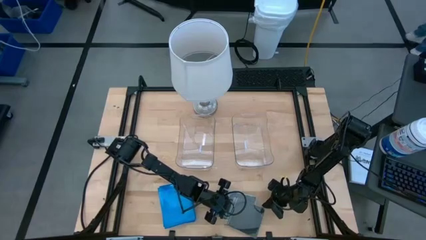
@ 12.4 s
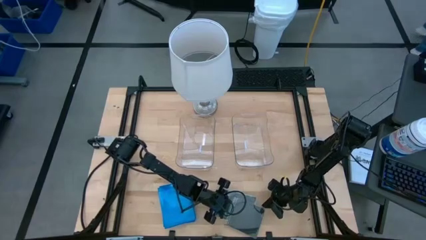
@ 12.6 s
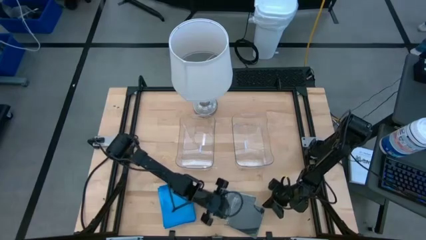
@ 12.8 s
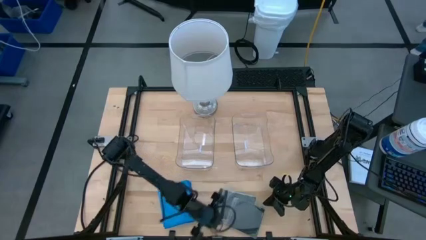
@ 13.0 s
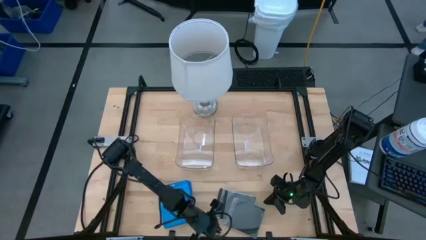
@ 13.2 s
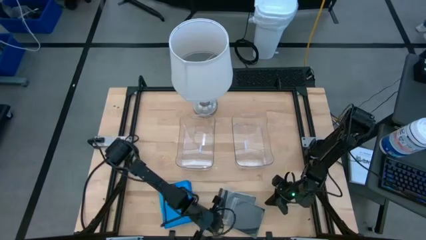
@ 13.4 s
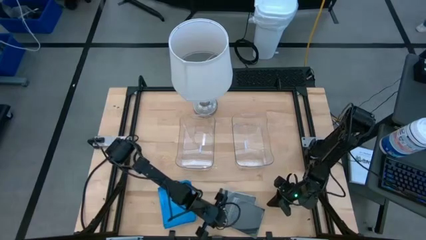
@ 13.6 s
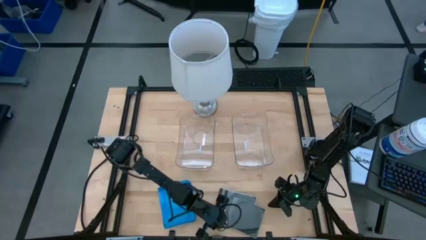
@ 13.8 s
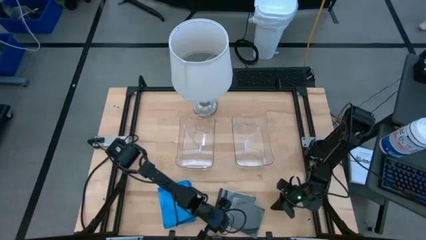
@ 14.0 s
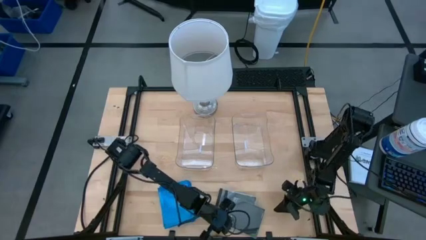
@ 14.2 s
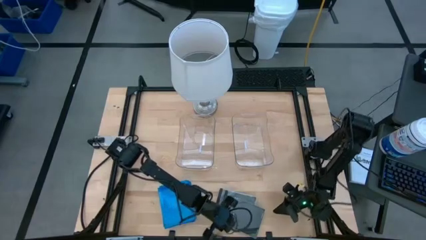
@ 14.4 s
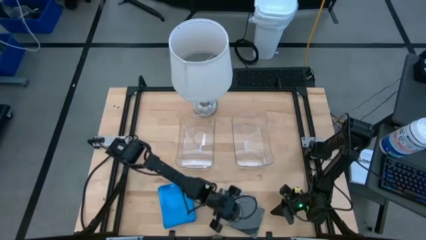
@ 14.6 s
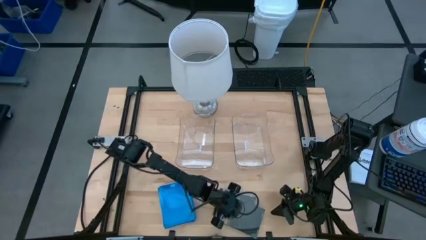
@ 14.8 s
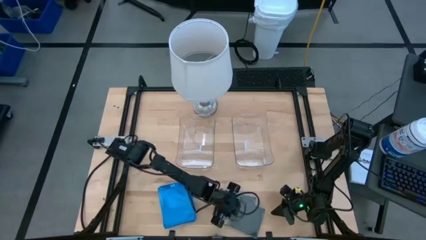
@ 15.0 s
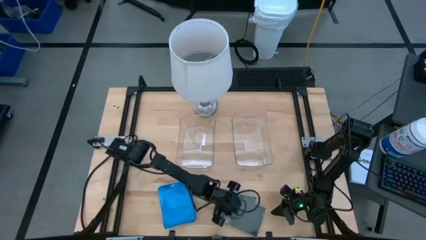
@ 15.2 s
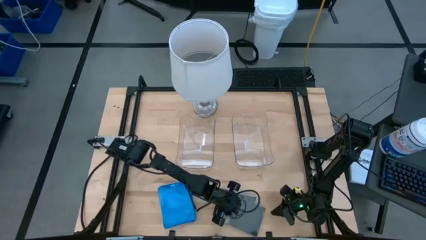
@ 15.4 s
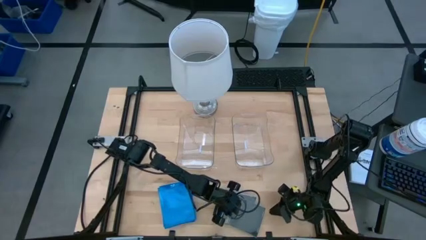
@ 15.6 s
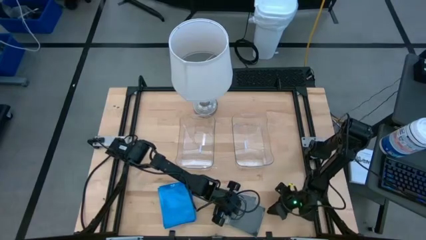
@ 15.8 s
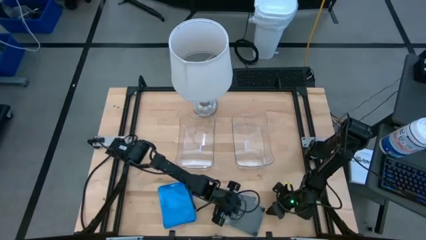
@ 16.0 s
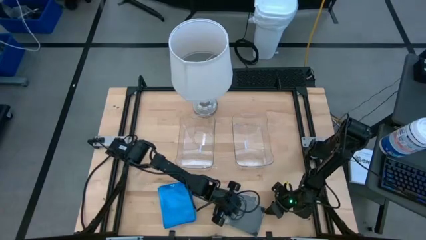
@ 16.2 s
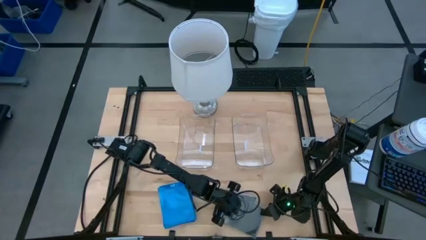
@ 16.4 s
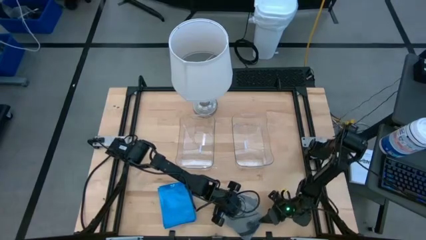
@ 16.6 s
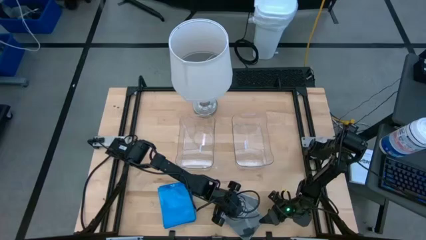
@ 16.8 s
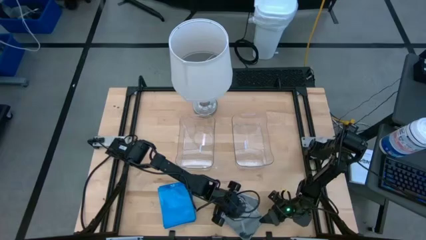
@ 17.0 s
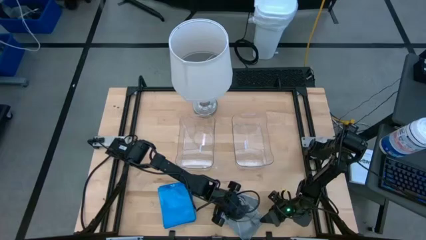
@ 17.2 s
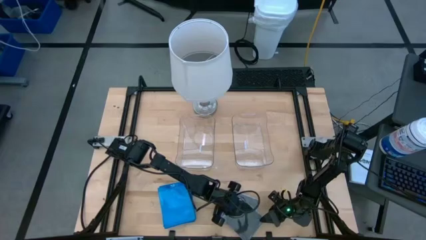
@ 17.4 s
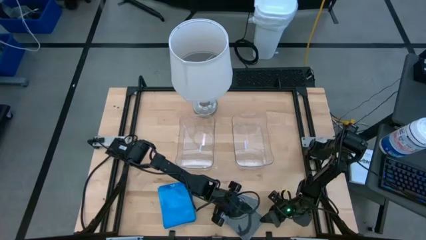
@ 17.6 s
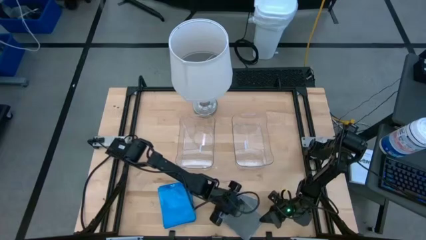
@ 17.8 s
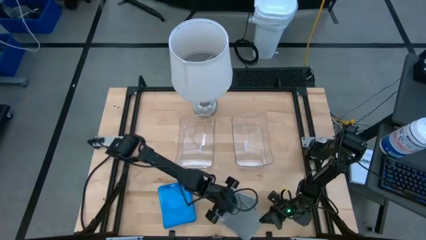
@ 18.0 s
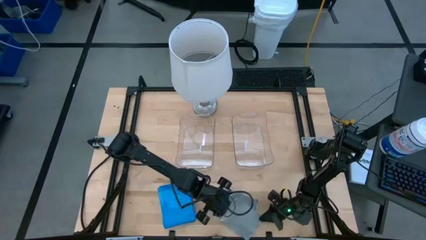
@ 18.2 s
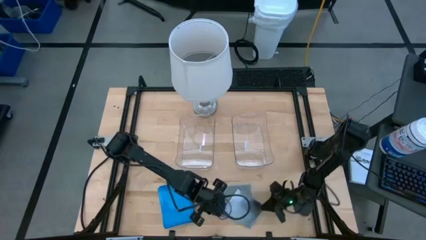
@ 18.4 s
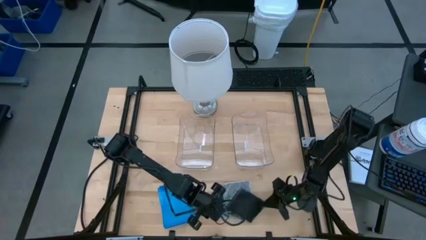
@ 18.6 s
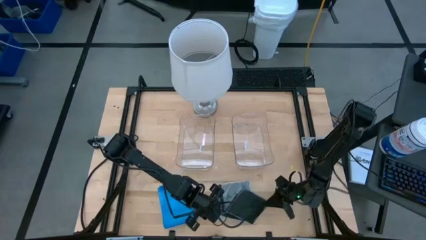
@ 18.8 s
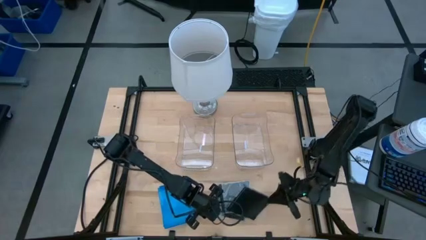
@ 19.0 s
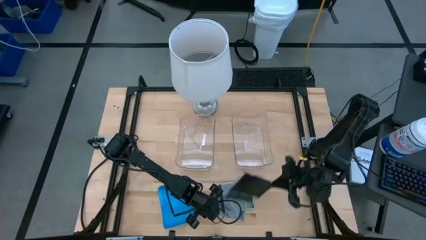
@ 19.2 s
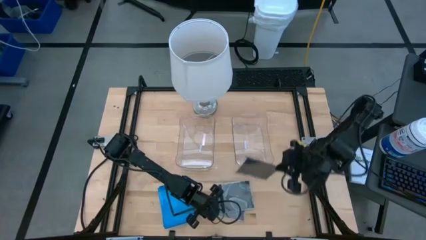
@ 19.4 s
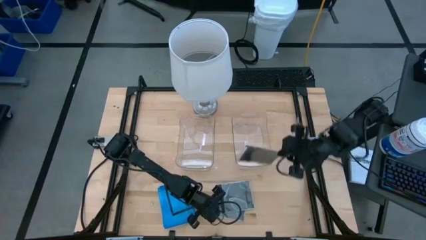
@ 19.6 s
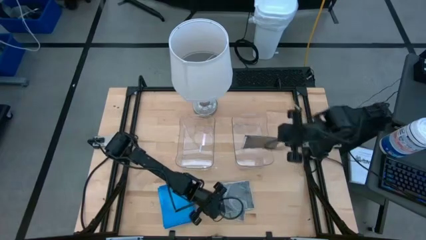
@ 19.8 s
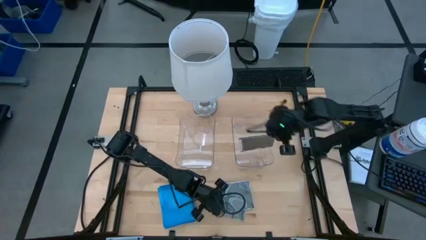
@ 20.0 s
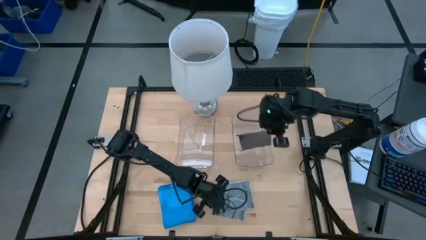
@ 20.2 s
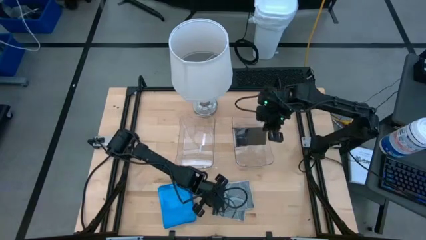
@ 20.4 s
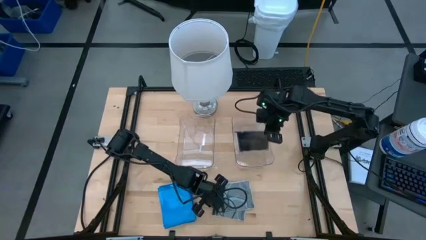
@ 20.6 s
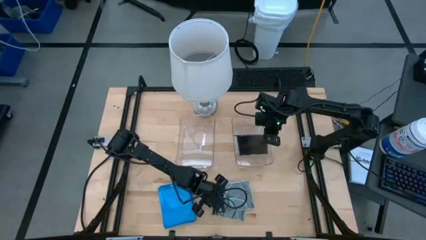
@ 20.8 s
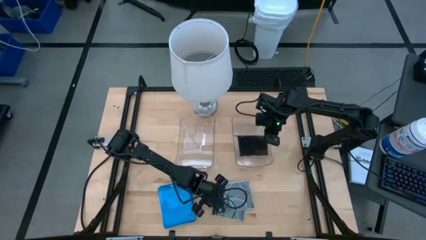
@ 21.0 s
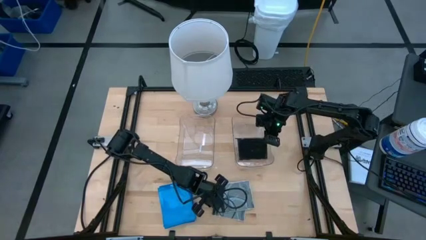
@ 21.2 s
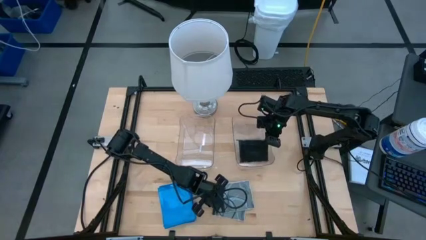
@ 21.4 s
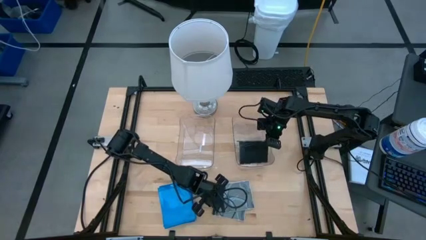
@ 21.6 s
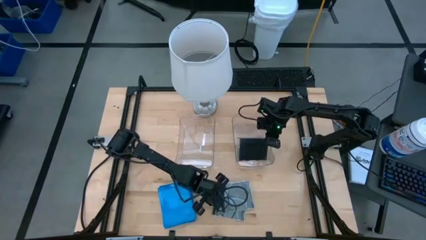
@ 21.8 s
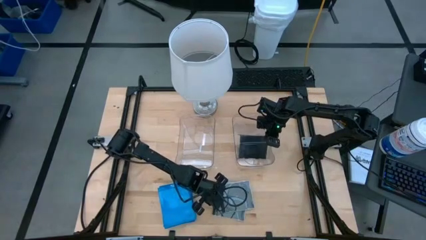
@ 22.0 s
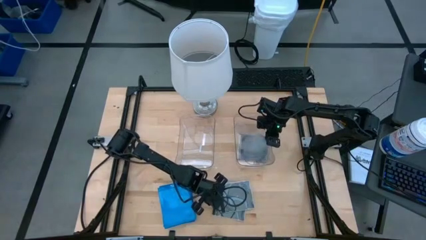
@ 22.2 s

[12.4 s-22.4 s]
Task: Pick & place jewel cases by type
Put the black CD case into the right transparent bin

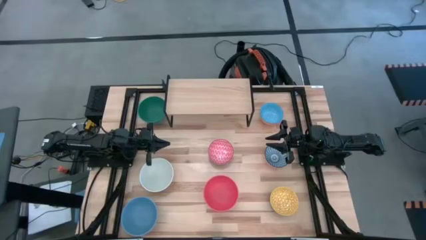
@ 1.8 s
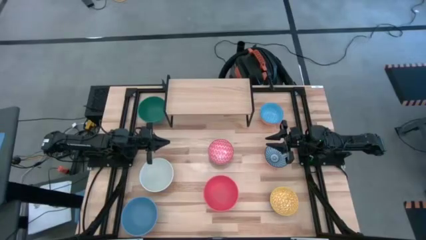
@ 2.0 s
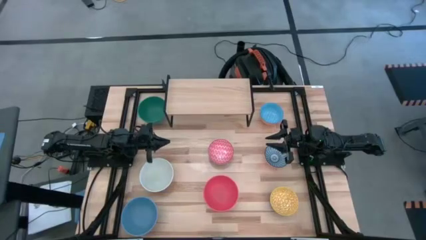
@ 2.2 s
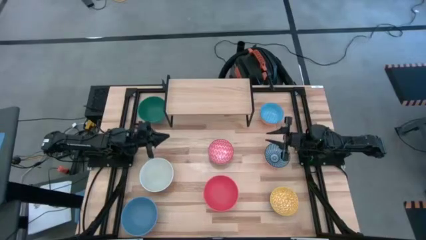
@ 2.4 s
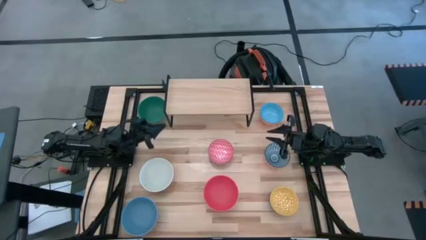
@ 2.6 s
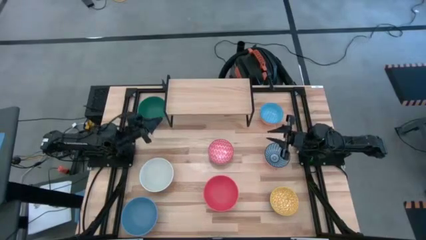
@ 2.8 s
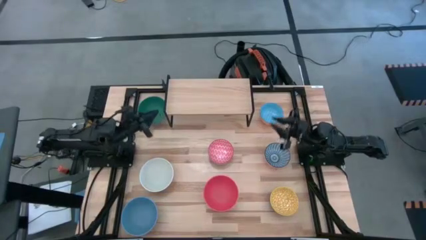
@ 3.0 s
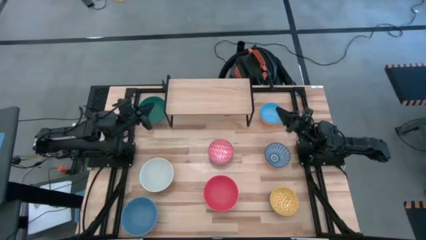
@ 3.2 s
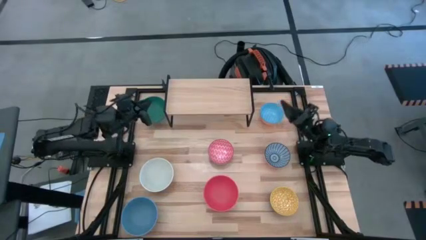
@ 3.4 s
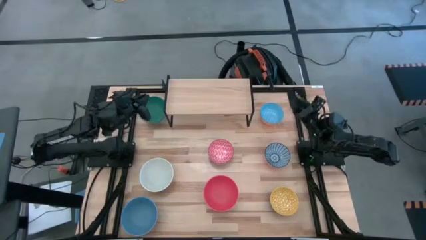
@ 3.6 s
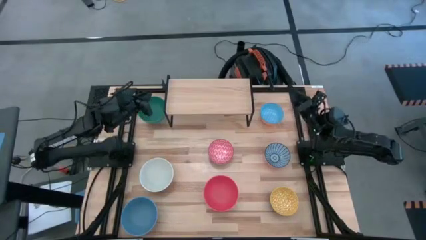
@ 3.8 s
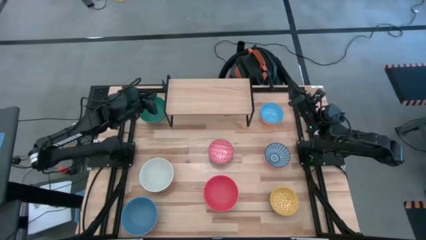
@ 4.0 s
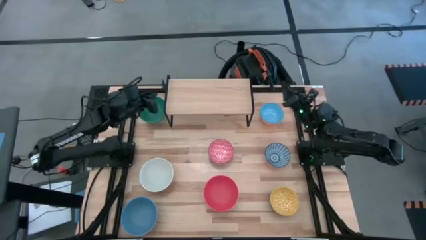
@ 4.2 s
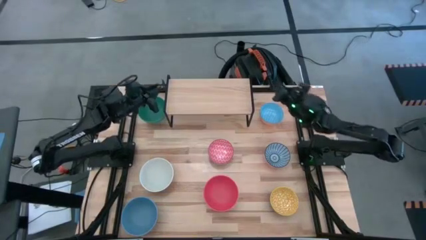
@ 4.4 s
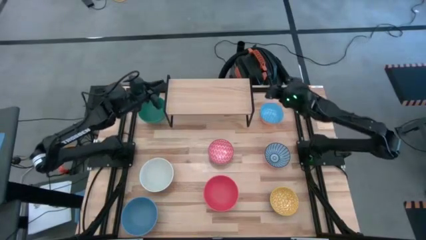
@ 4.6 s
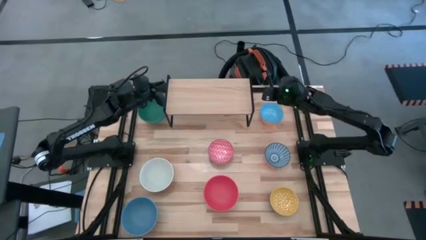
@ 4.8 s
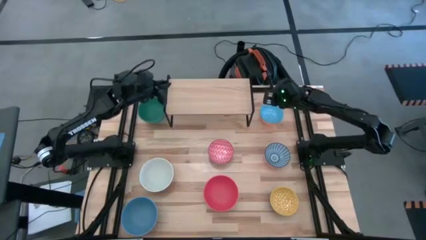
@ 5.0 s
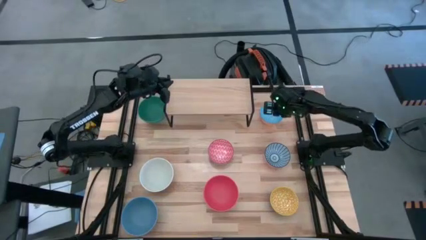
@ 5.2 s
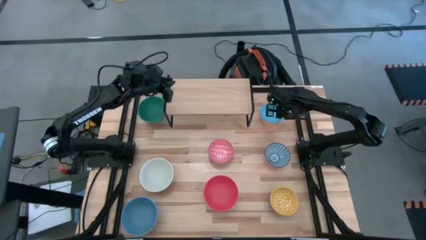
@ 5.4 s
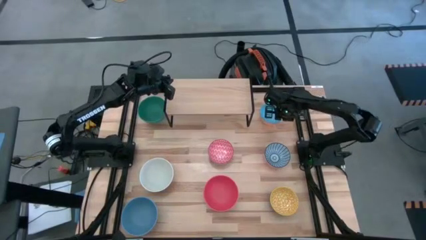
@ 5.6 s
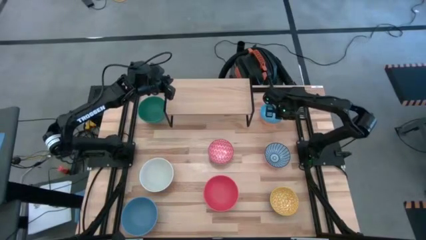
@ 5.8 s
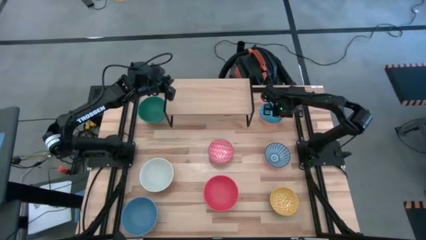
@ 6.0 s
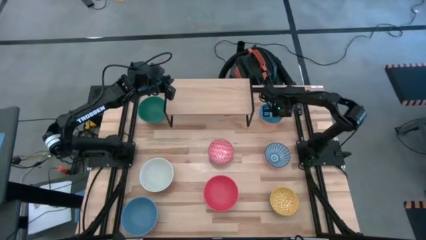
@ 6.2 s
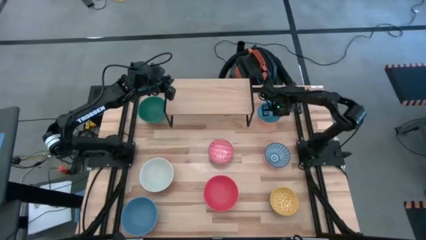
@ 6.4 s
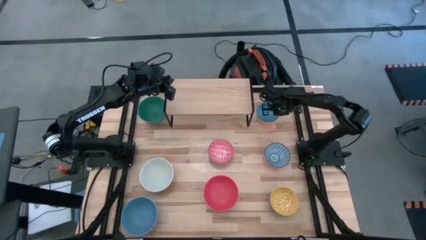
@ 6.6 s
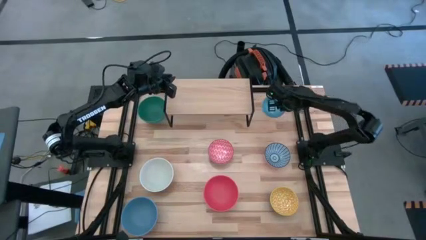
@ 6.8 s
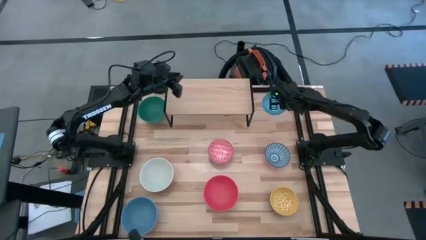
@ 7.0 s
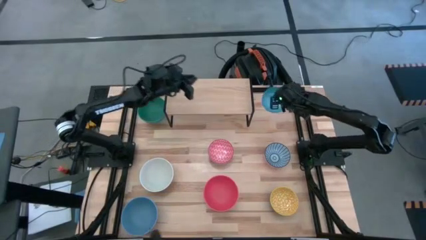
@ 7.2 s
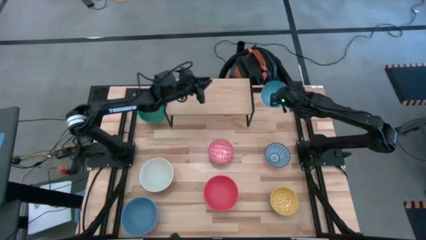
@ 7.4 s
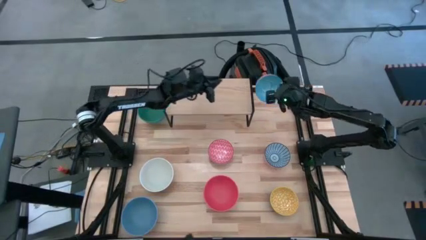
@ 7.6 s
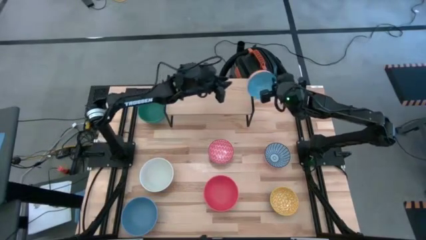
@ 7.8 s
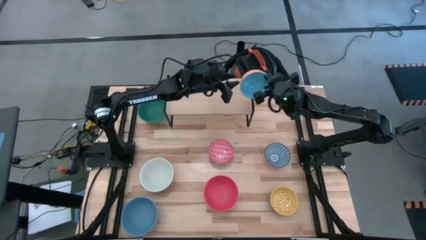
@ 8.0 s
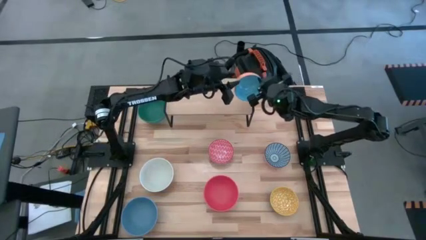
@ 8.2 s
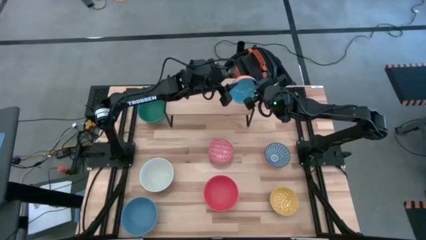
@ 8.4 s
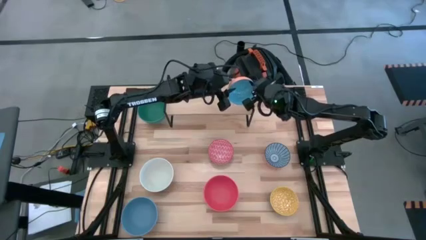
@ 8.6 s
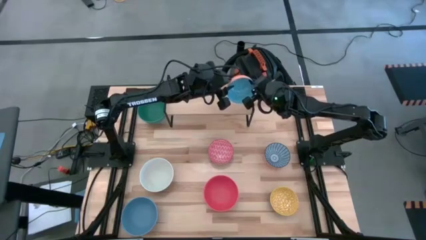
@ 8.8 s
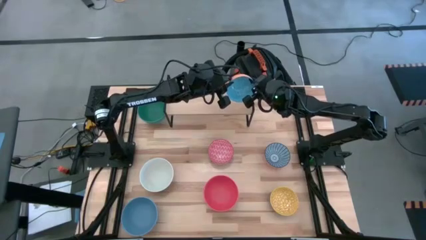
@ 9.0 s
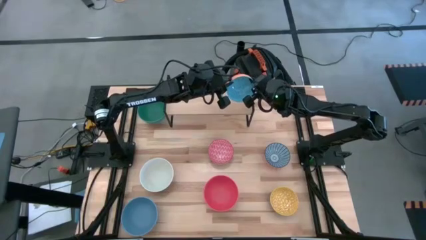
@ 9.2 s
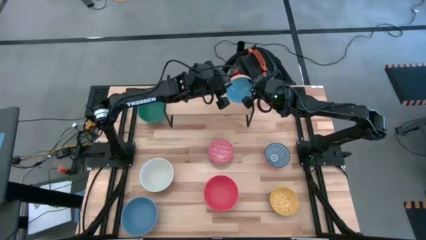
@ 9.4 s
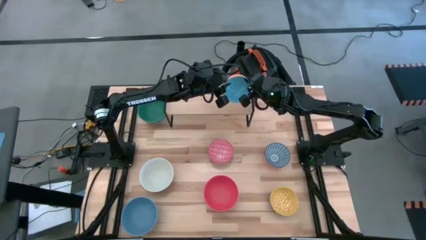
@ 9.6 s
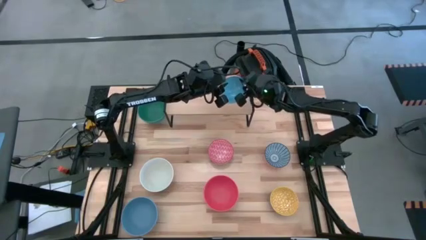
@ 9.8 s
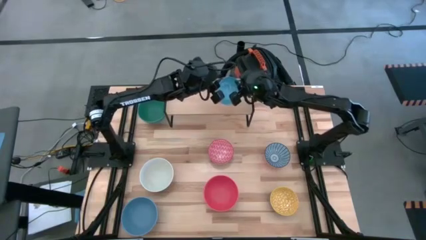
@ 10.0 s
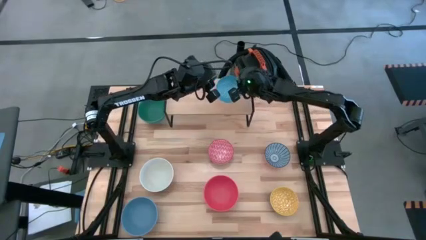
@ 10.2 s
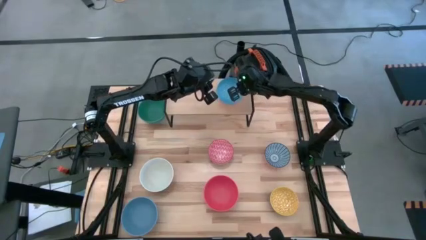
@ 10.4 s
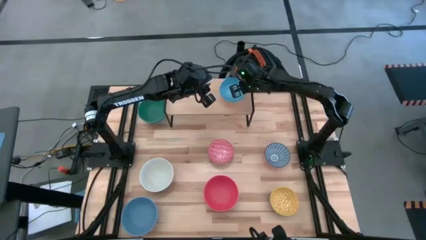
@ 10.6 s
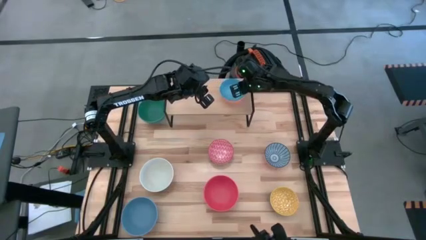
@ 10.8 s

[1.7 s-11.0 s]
Task: Place and stack bowls onto a shelf
Put the blue patterned bowl on the shelf
